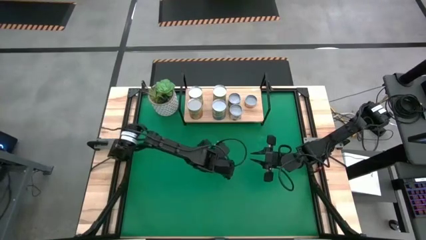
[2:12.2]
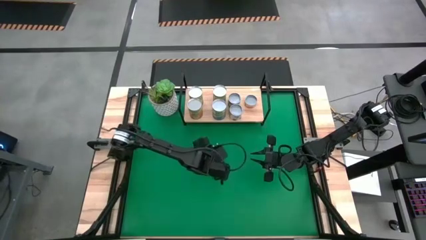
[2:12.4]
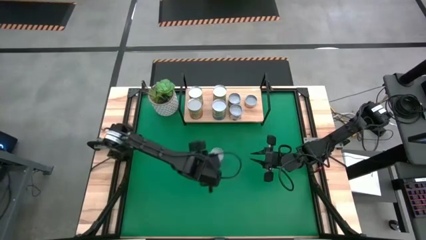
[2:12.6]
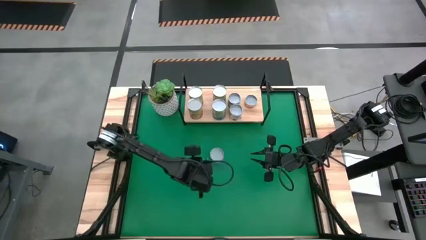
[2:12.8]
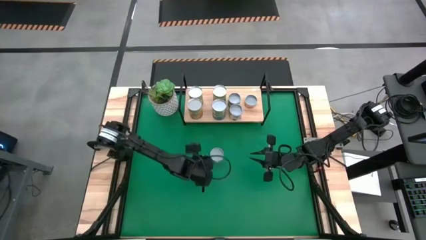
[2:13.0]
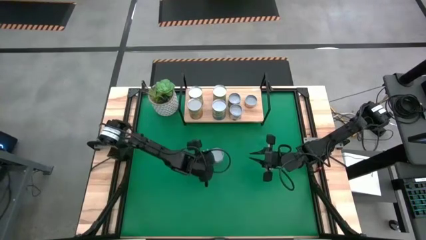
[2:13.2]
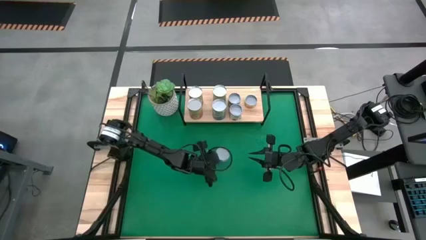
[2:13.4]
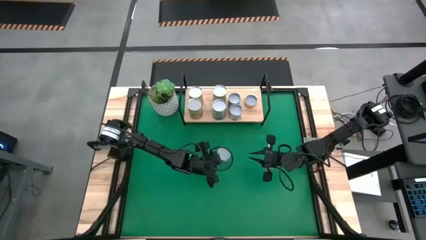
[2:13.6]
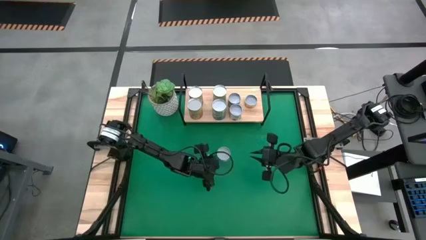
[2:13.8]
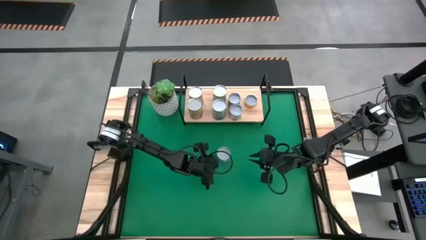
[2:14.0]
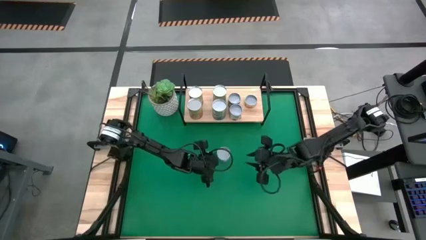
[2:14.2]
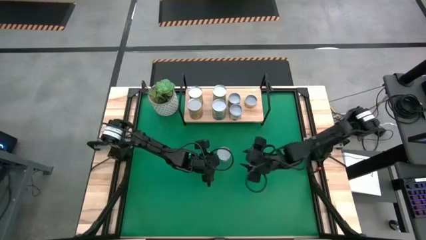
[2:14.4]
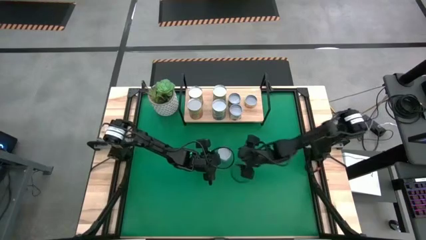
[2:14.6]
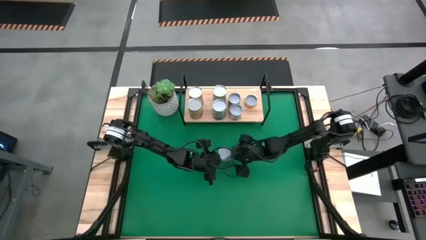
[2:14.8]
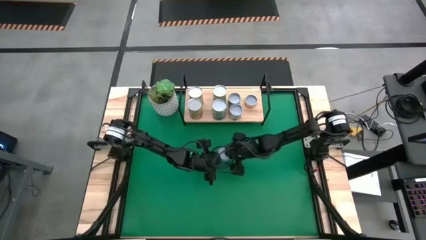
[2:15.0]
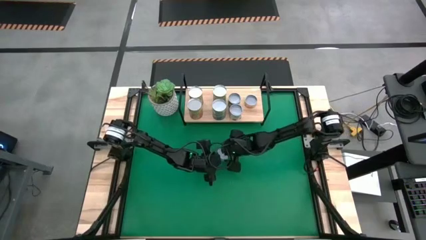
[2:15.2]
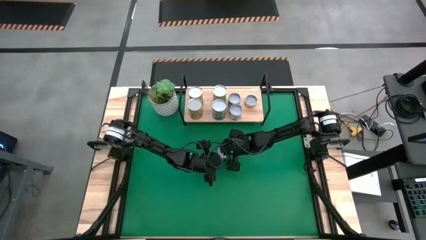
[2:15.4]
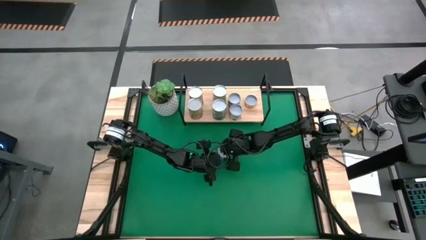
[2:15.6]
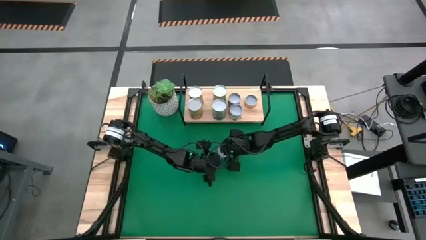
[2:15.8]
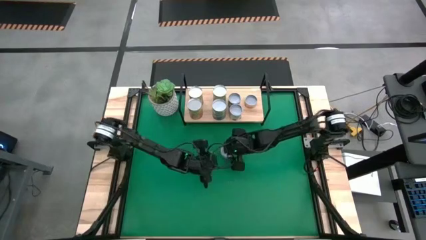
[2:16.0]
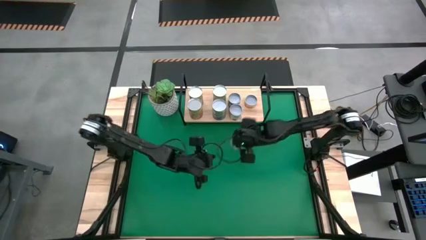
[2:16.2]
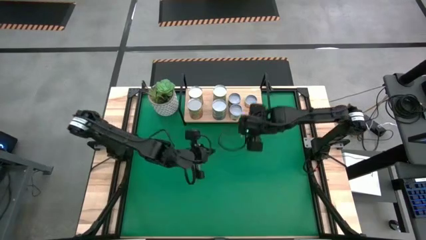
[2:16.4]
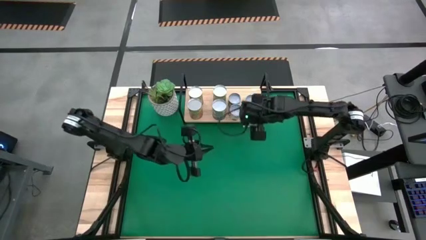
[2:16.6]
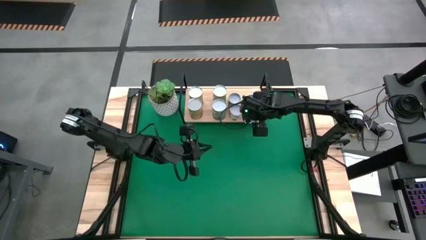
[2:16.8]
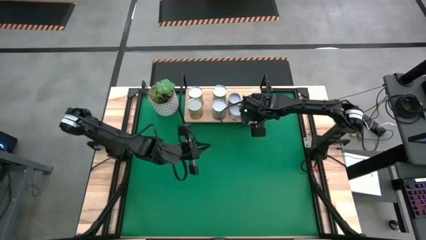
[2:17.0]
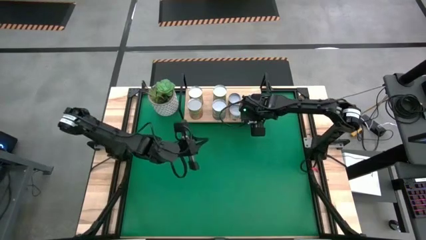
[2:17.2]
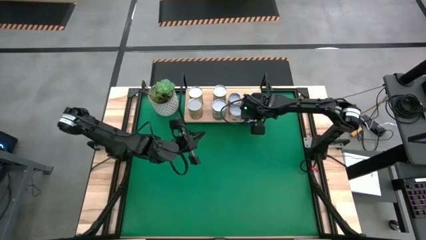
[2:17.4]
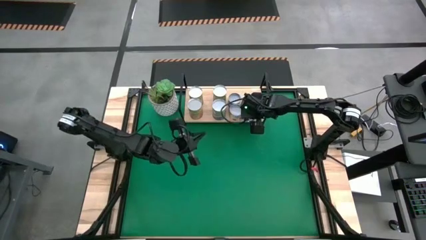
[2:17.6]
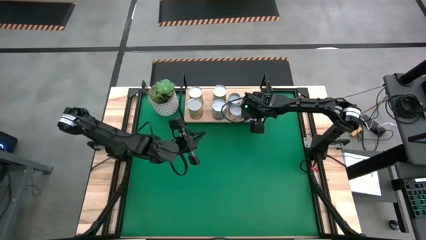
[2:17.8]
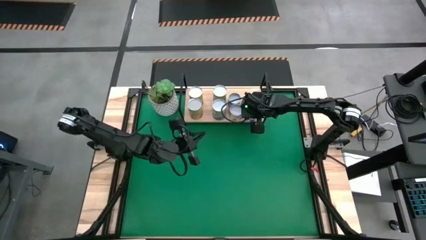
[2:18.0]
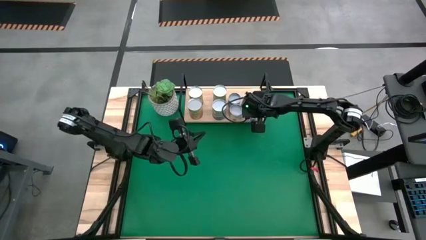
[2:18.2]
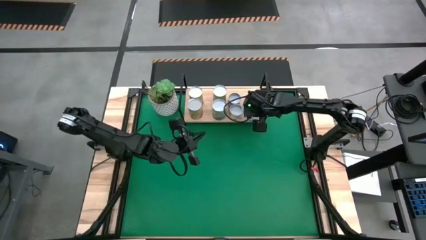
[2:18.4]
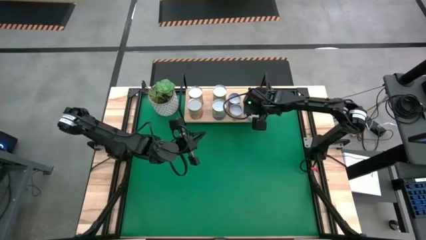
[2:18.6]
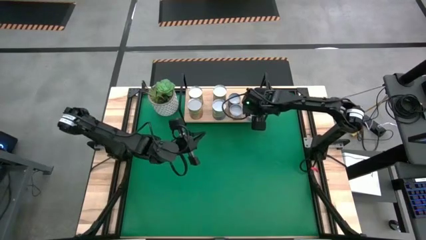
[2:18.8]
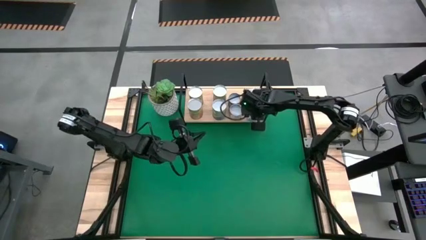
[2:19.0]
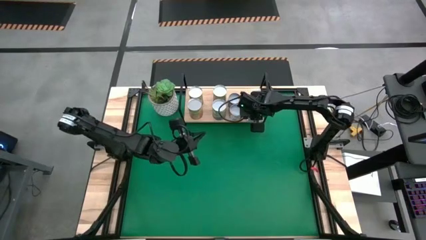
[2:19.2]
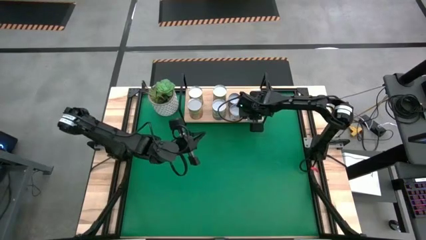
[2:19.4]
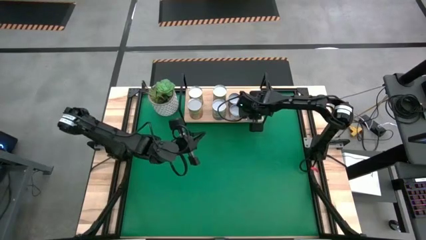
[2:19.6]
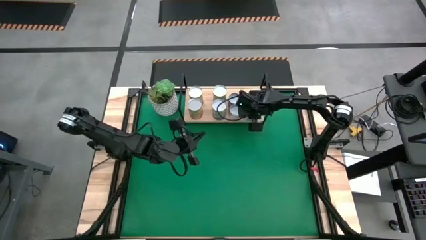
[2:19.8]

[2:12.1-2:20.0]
Task: Pick and place cans onto a shelf
Put the canned tuna on the shelf

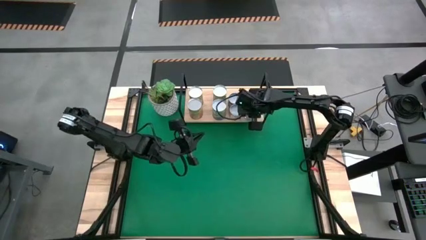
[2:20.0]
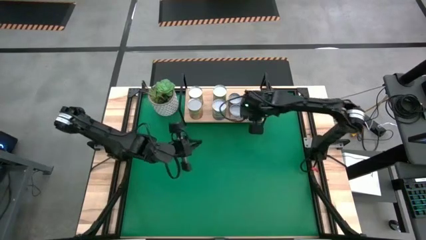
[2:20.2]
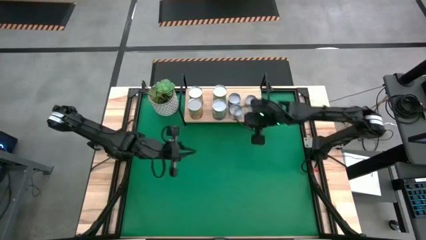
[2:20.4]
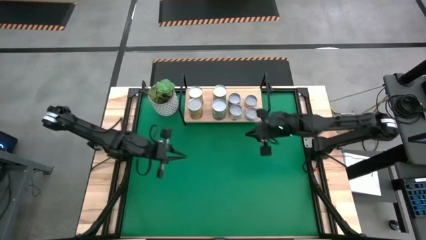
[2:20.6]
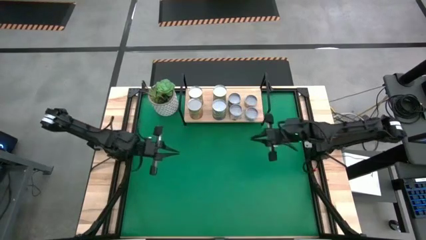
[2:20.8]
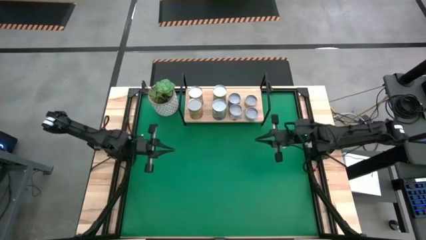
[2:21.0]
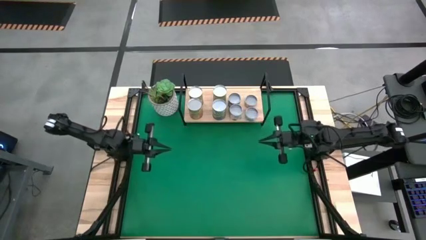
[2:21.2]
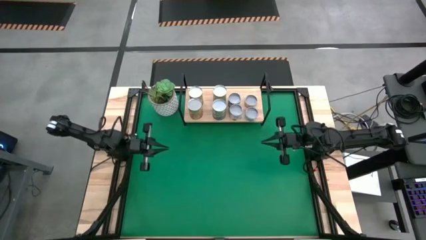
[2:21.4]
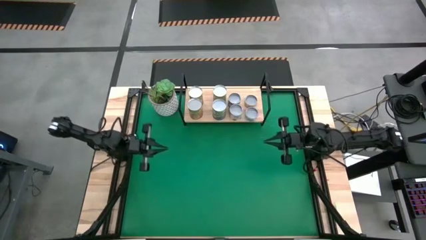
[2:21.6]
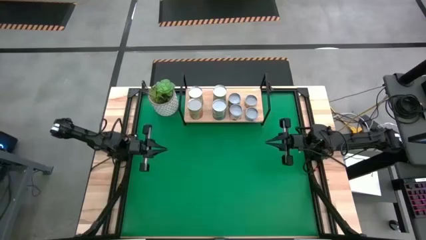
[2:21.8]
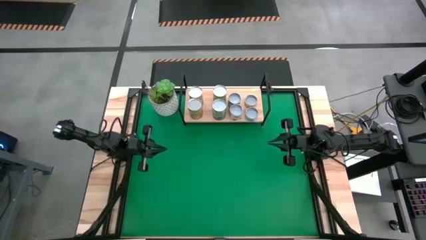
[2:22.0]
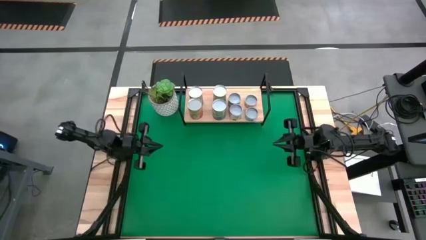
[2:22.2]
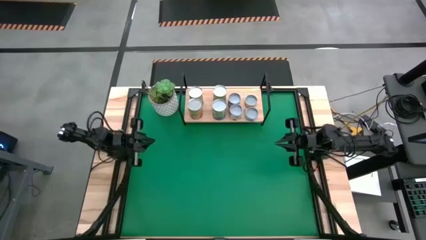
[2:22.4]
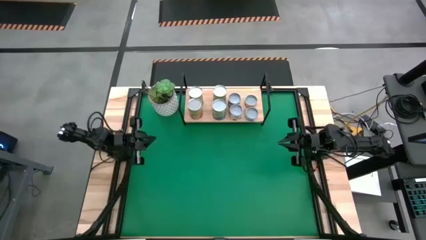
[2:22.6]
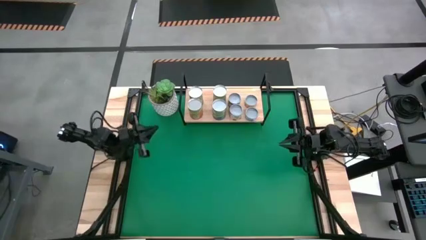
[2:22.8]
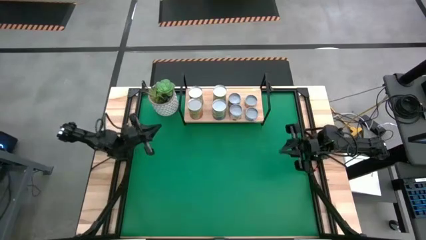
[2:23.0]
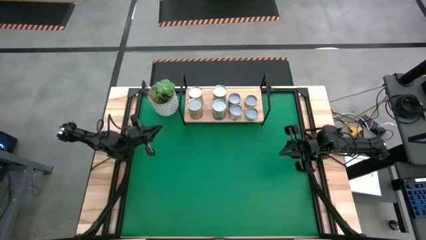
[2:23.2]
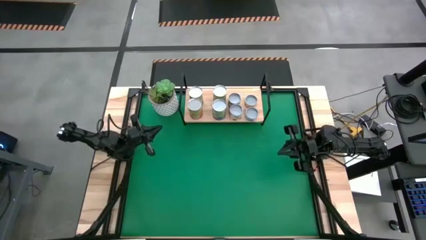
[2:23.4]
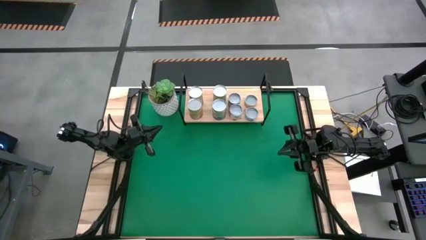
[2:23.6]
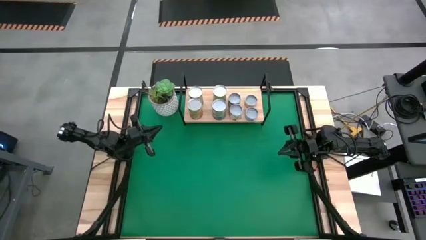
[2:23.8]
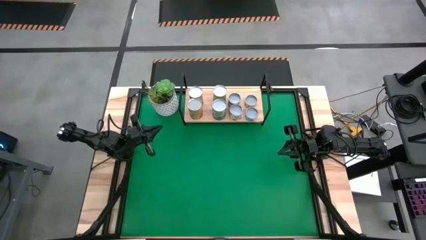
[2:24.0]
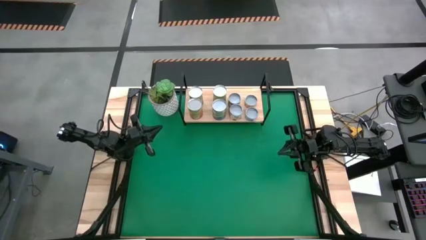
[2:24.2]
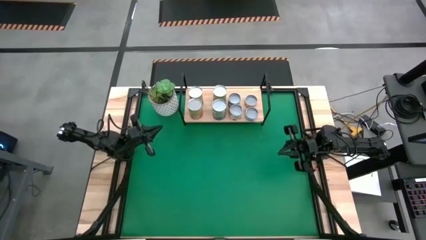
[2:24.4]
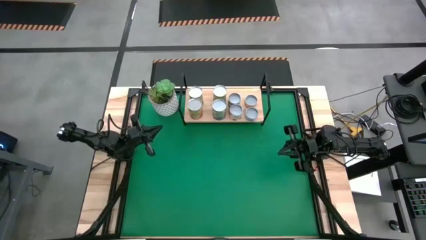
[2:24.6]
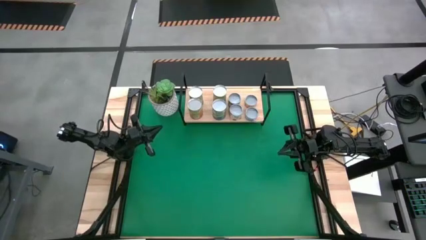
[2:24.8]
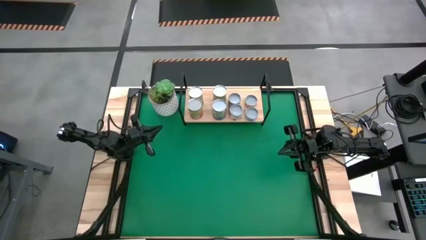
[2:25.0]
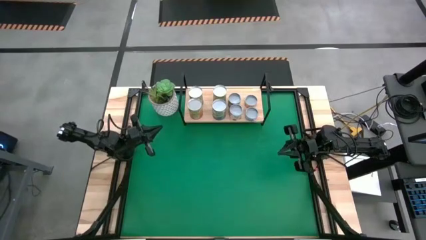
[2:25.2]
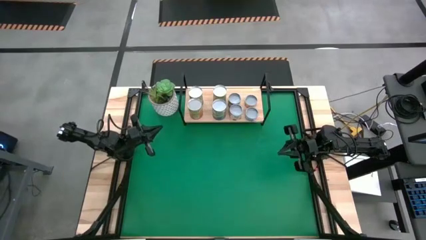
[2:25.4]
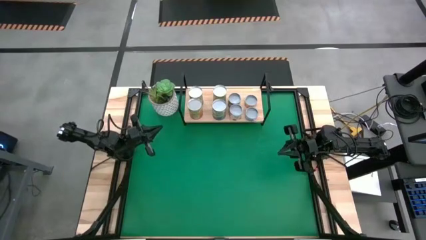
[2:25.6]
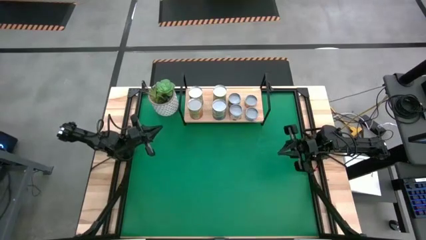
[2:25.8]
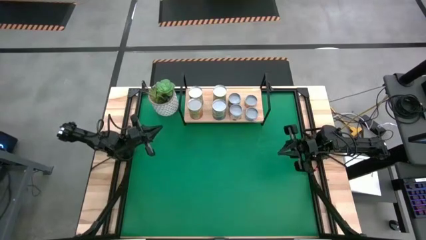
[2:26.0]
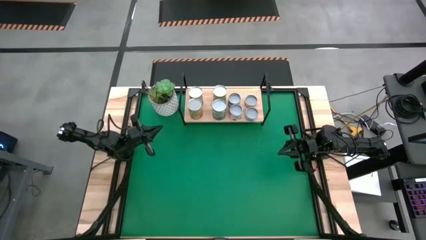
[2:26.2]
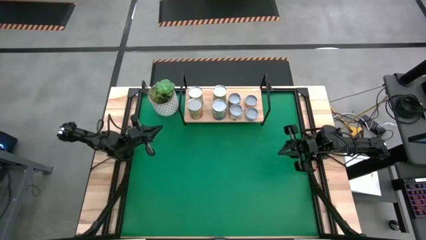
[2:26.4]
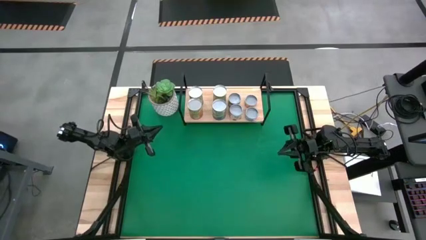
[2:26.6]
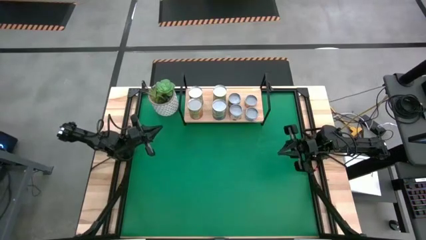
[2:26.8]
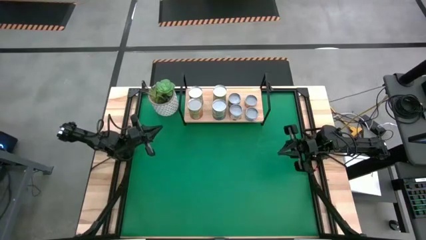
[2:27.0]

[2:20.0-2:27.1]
Return to Home Position
